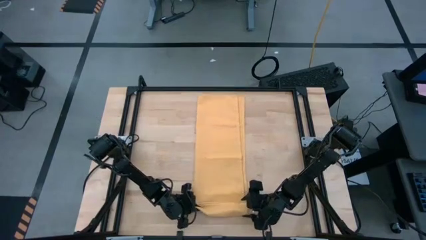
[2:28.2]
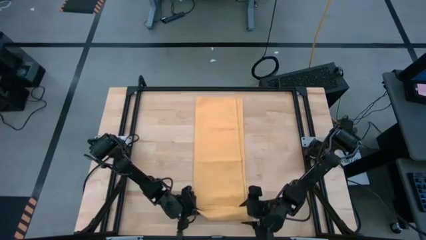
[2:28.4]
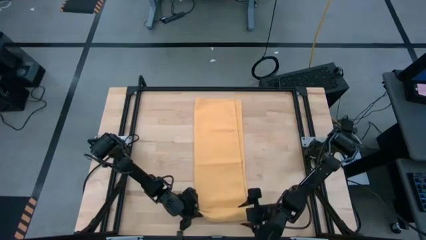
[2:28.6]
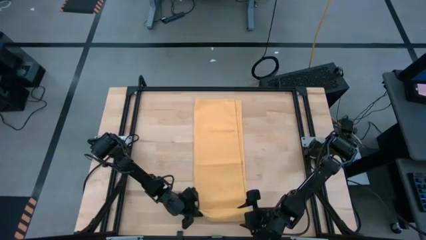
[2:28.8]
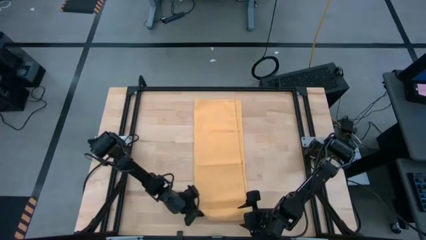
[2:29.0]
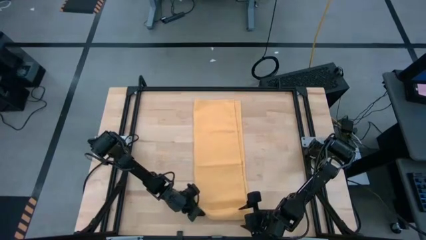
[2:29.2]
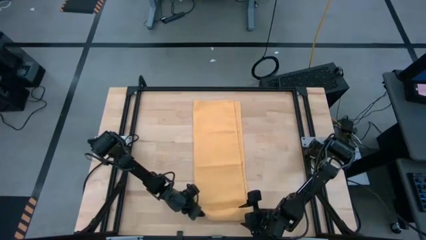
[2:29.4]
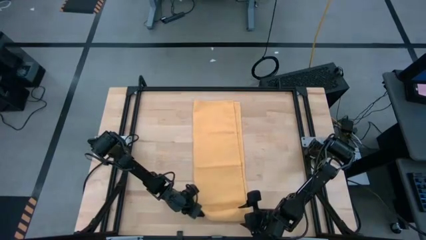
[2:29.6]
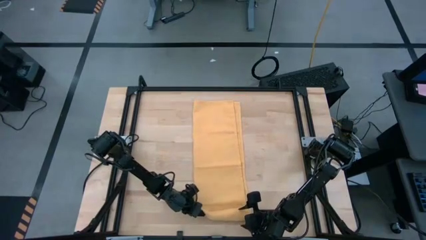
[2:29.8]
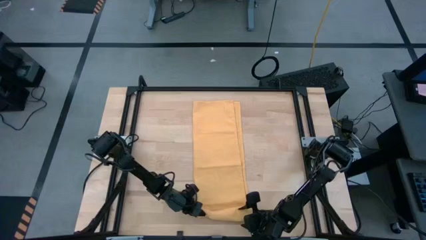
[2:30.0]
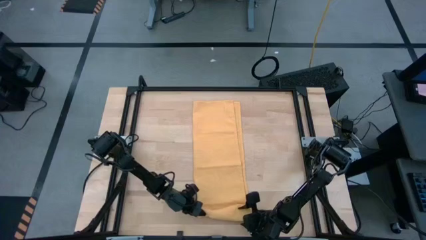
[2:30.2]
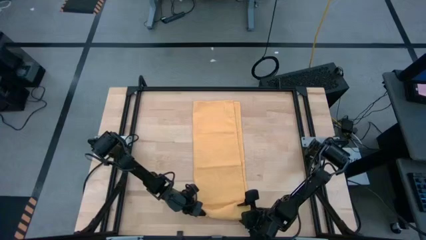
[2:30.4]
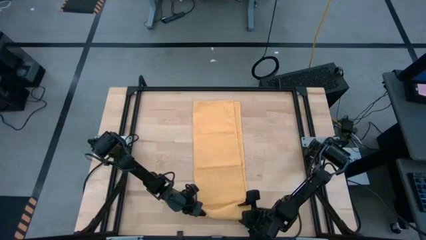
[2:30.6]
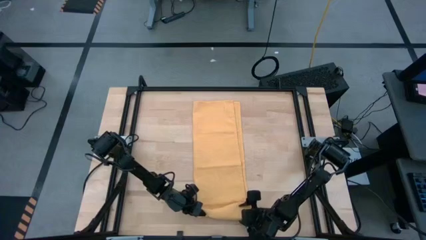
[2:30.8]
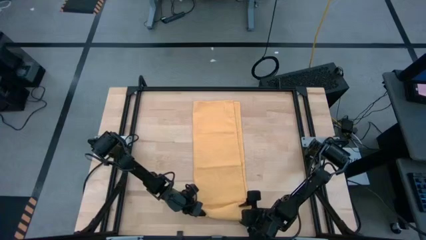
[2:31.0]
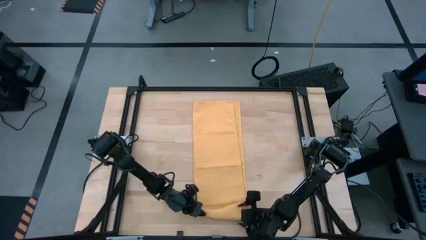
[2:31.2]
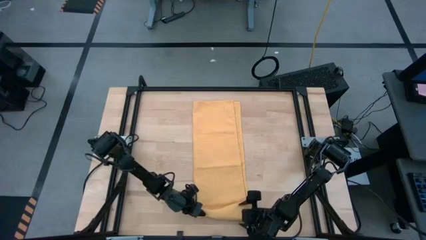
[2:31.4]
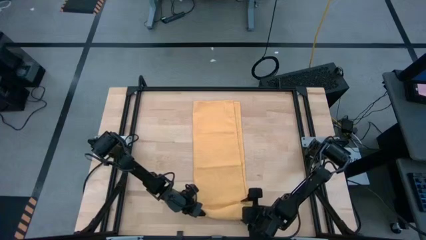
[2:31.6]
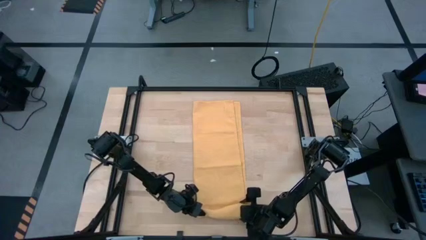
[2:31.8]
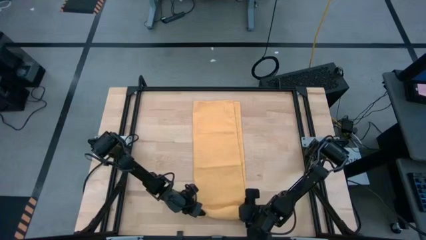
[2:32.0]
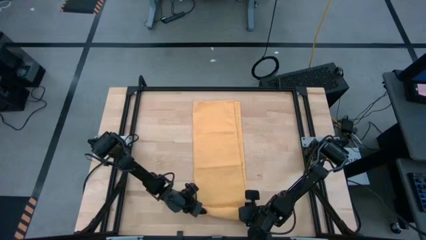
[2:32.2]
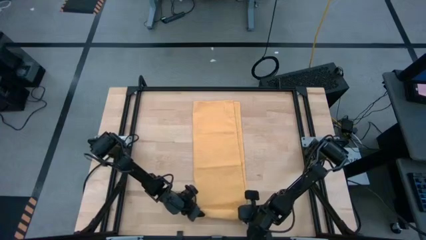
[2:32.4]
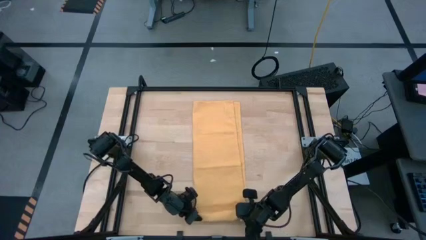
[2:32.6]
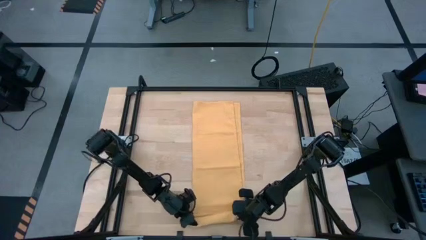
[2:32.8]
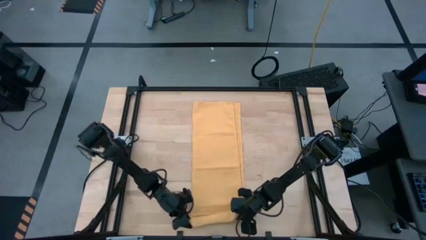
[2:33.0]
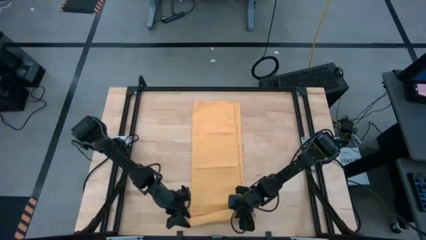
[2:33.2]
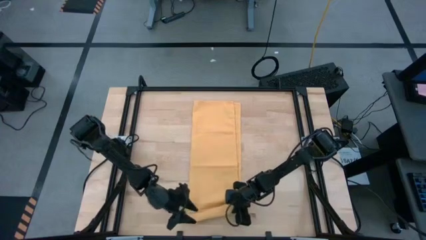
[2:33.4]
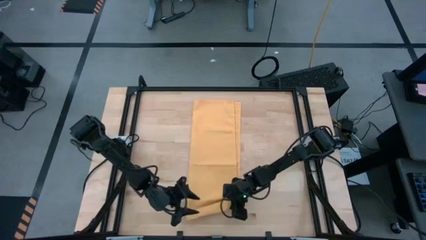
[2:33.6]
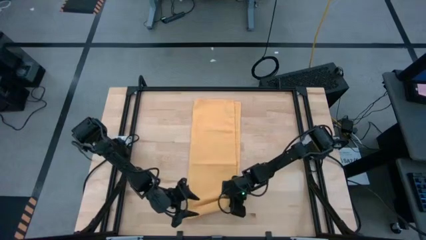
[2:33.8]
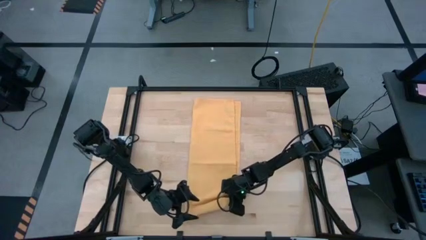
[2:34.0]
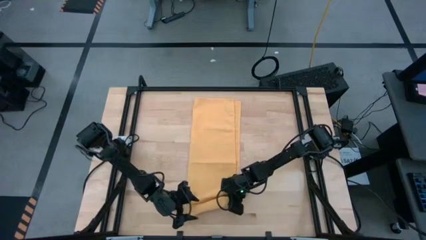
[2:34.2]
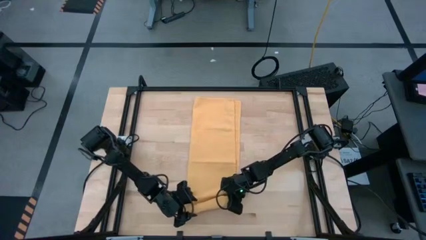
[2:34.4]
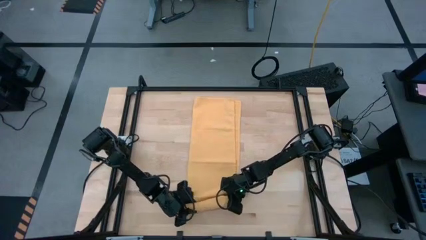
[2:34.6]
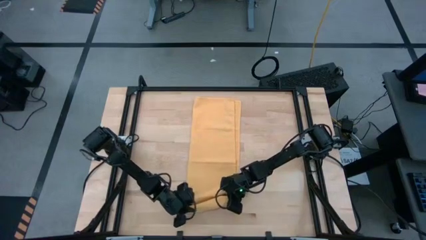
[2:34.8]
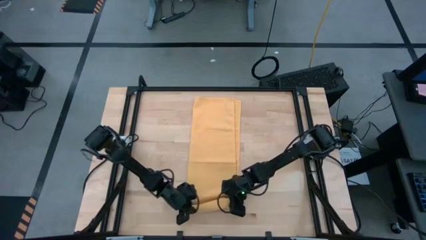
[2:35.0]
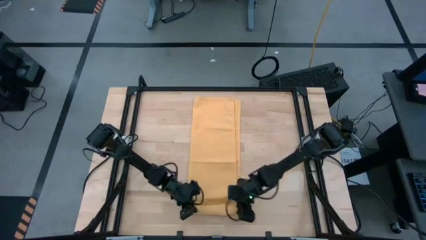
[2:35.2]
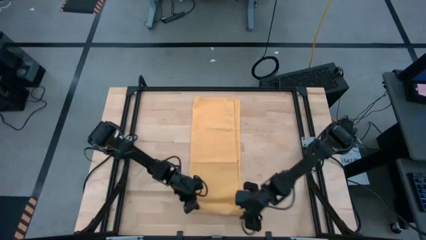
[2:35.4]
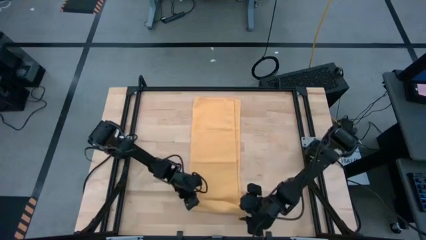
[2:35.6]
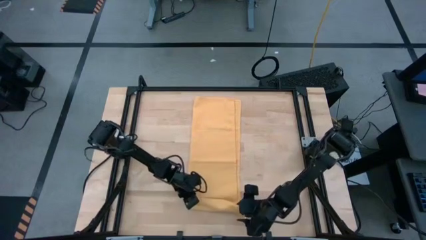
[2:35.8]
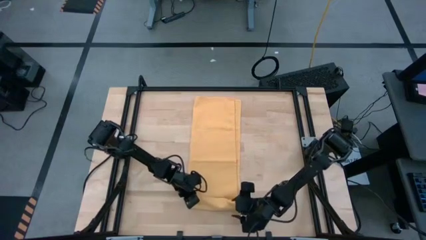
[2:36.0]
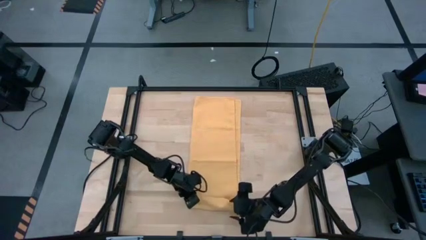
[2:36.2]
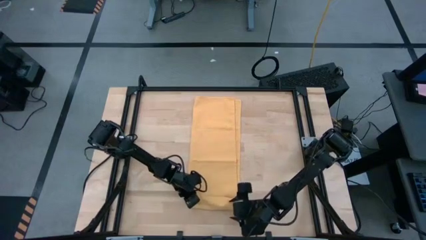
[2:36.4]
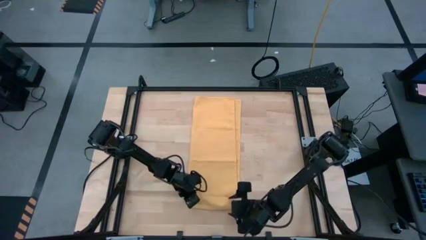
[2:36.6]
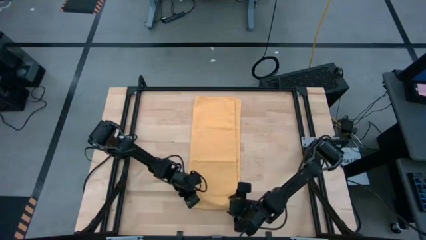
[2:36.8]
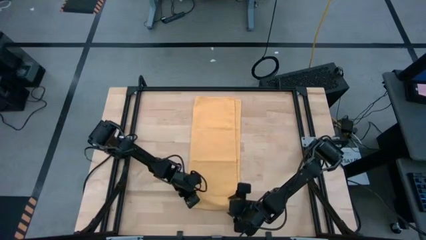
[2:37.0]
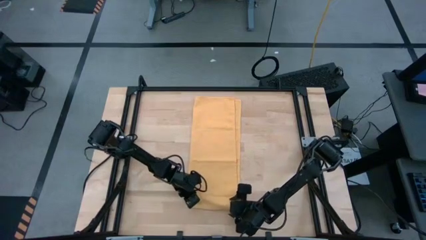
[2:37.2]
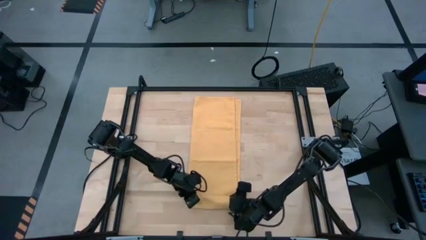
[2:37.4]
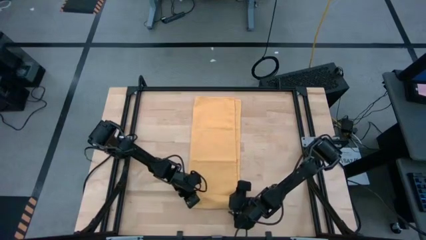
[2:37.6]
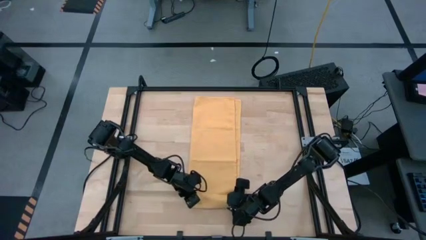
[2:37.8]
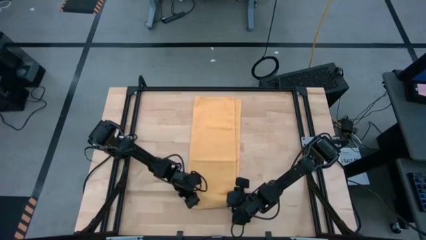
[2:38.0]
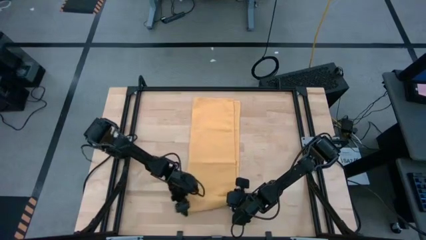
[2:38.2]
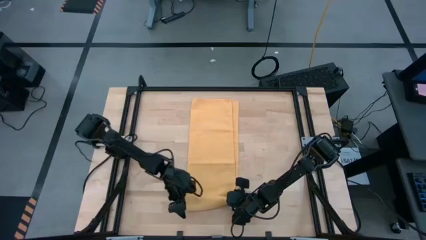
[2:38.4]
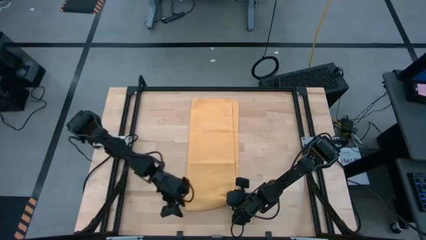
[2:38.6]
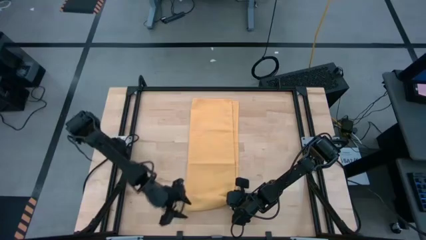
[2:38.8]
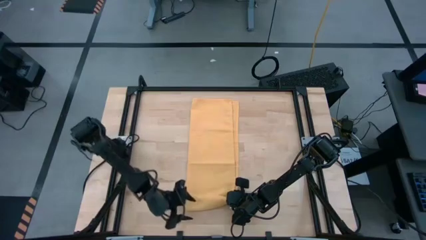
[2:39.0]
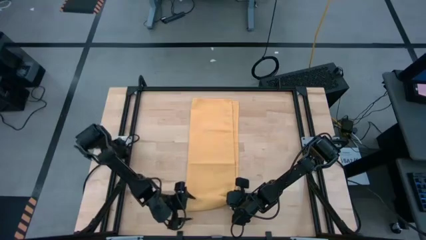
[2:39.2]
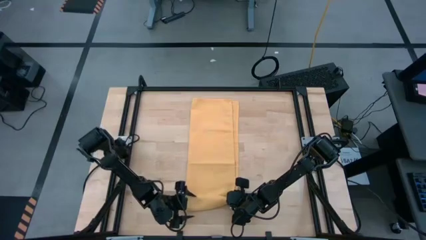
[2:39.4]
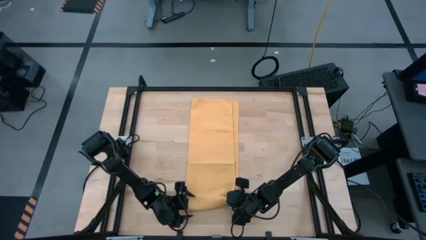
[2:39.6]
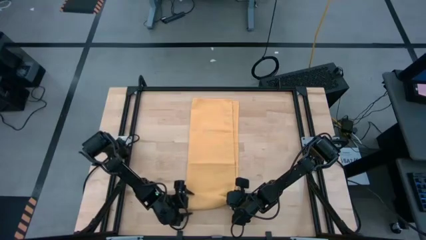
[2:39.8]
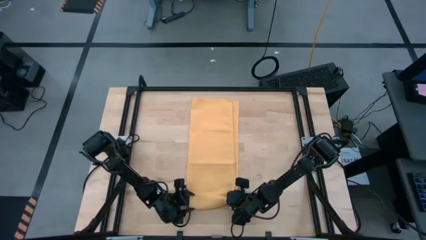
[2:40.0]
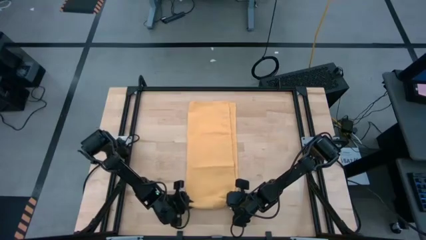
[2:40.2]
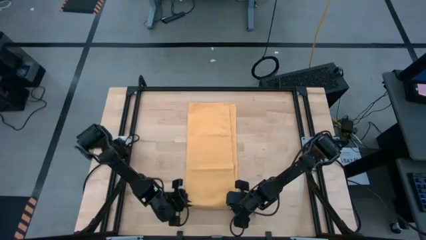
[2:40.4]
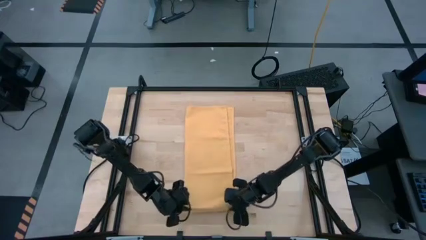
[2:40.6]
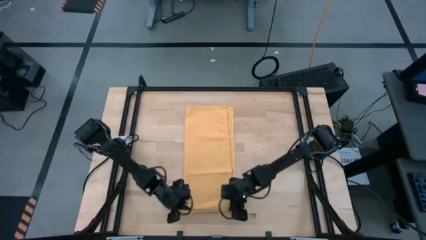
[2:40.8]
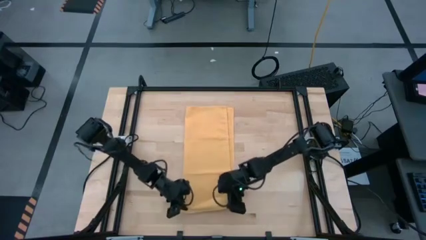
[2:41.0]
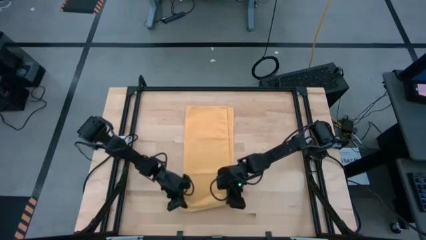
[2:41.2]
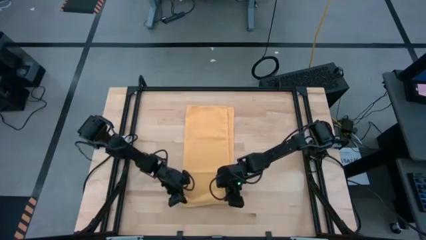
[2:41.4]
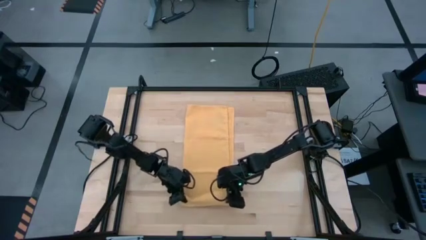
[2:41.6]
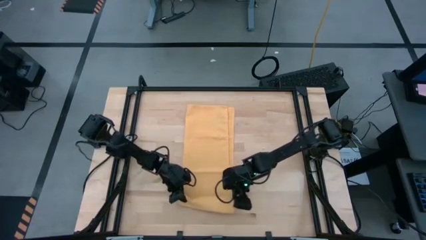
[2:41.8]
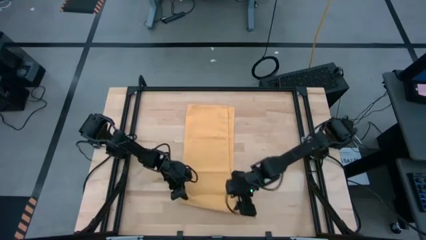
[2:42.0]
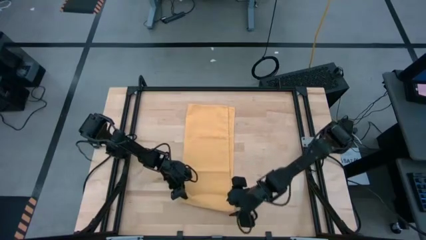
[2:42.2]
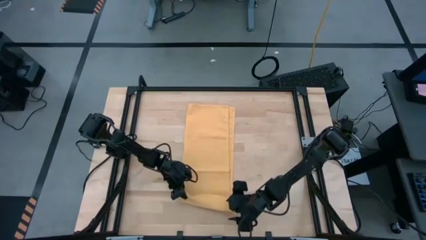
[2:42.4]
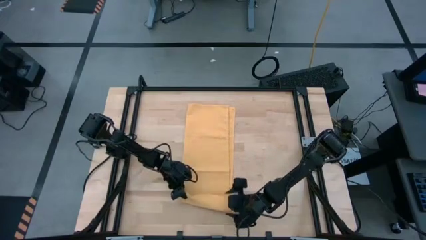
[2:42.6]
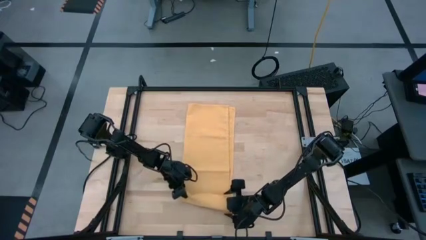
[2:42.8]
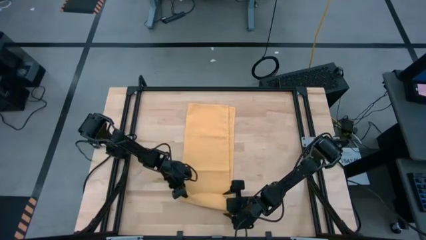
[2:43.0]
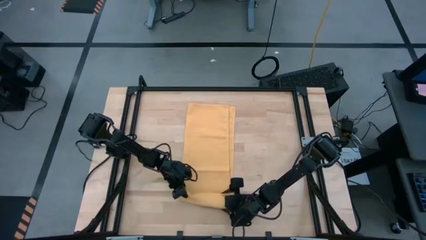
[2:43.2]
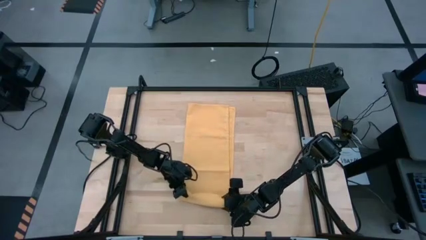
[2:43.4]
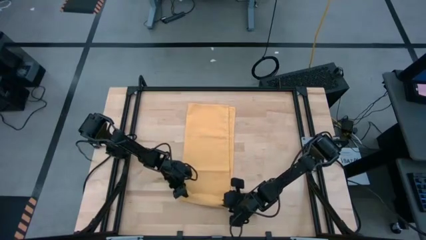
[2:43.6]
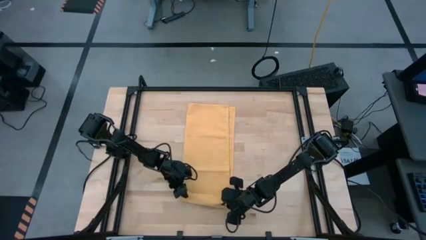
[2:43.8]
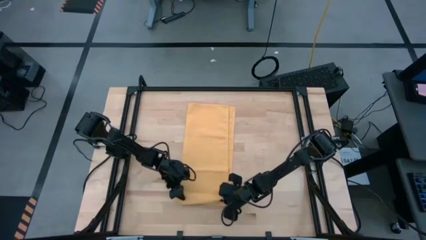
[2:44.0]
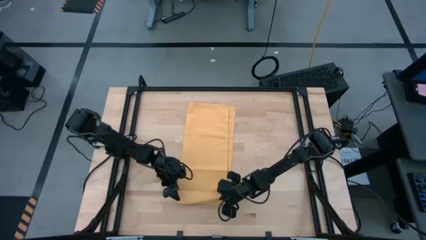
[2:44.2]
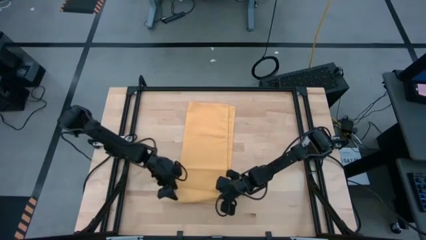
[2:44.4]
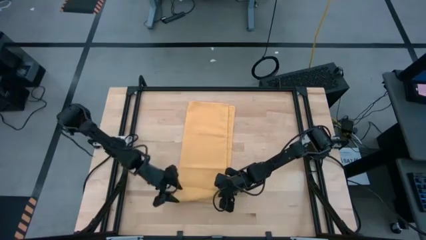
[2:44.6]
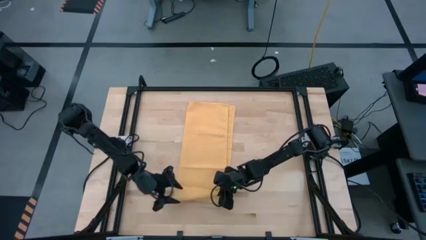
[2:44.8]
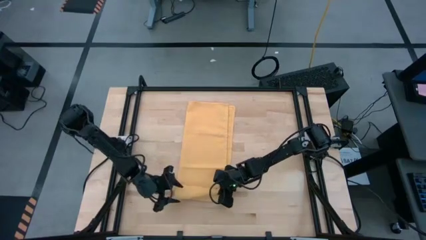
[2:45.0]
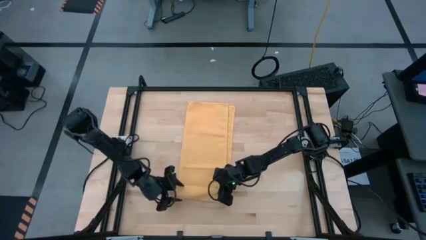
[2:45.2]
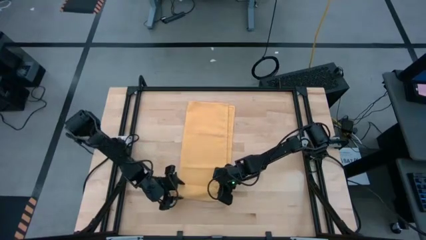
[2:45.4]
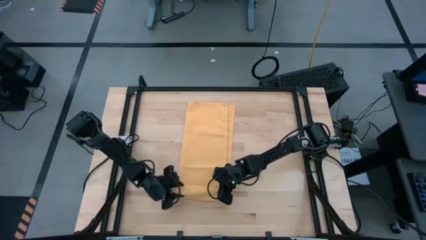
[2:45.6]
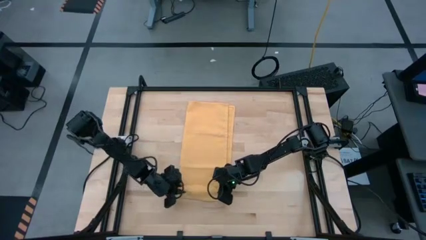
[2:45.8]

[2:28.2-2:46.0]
Task: Roll towel
Roll the yellow towel
